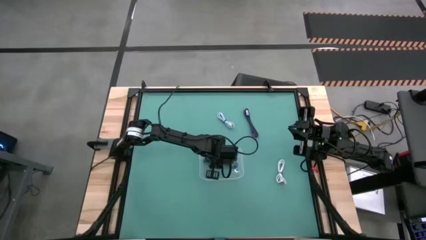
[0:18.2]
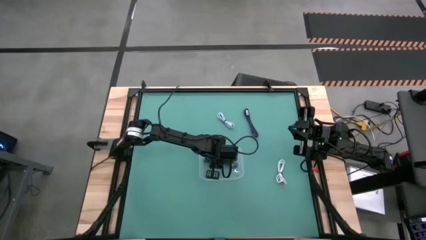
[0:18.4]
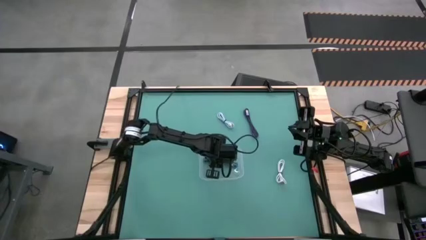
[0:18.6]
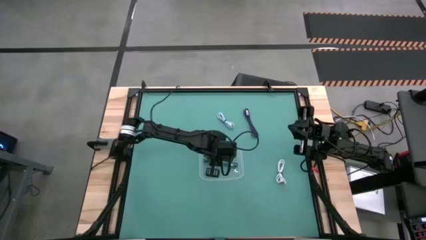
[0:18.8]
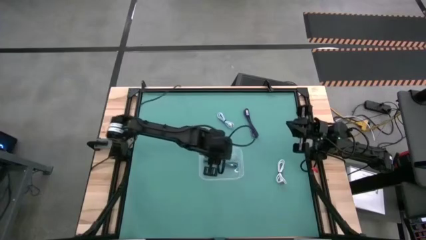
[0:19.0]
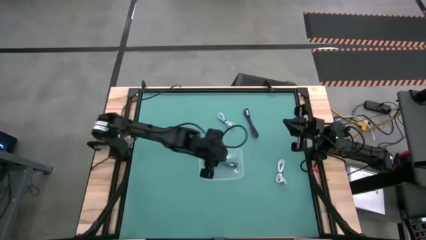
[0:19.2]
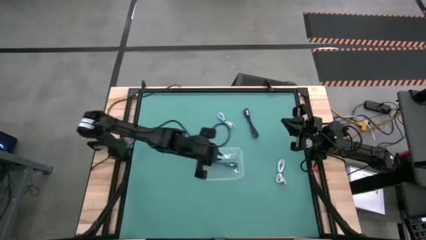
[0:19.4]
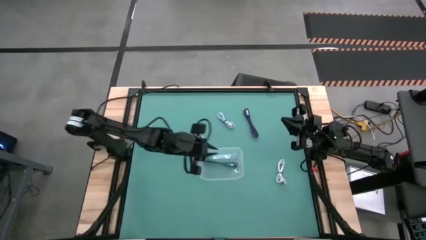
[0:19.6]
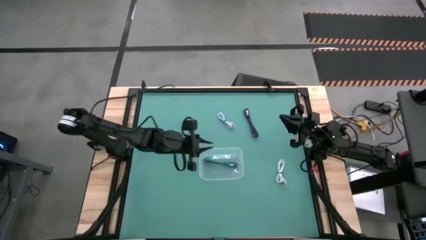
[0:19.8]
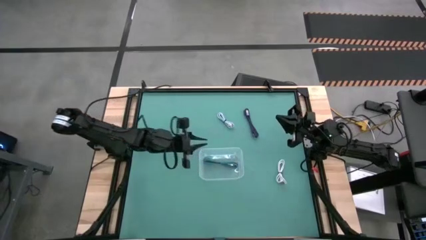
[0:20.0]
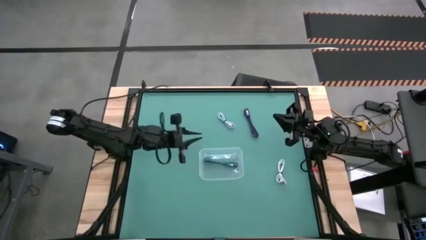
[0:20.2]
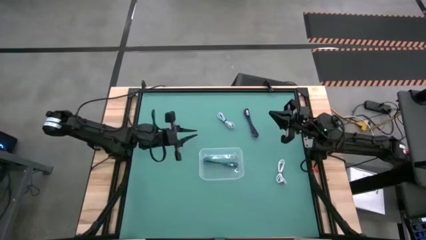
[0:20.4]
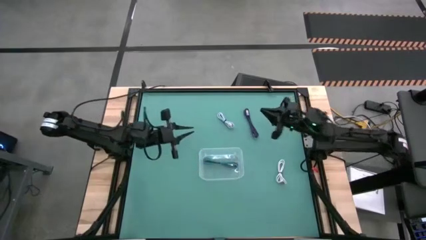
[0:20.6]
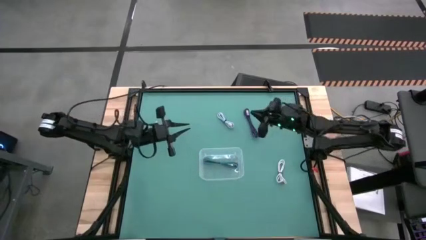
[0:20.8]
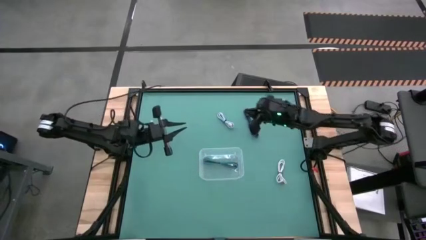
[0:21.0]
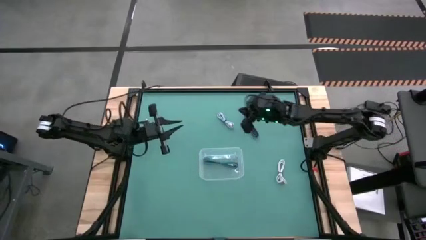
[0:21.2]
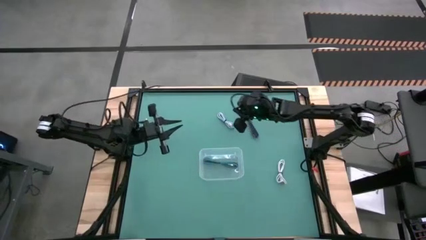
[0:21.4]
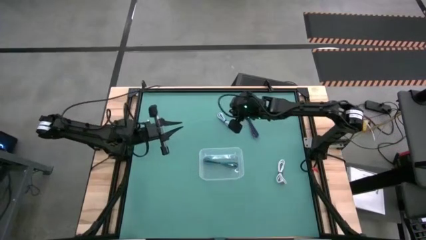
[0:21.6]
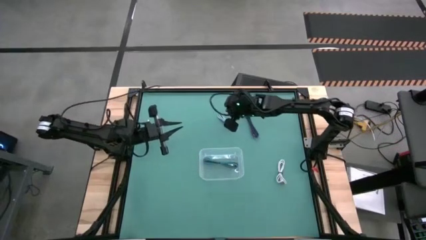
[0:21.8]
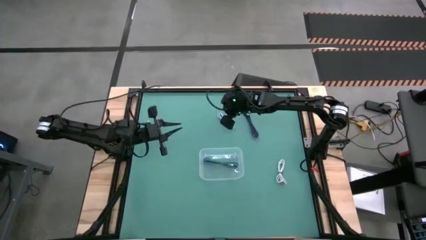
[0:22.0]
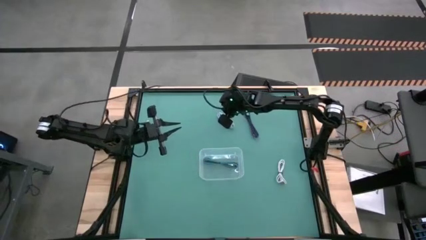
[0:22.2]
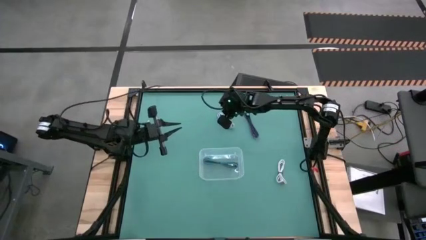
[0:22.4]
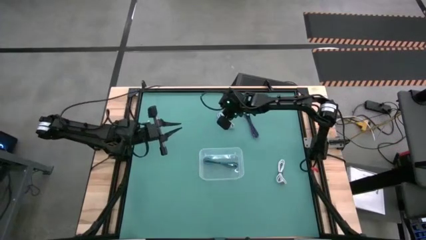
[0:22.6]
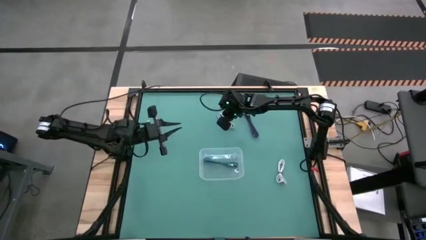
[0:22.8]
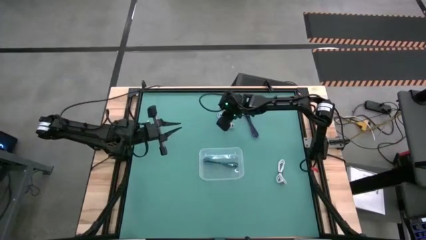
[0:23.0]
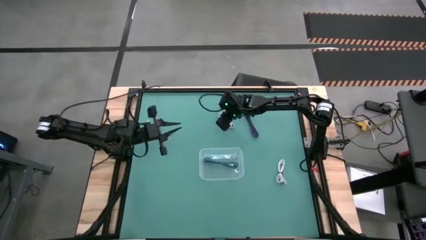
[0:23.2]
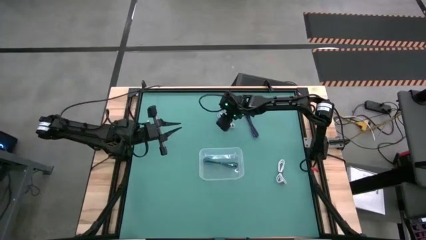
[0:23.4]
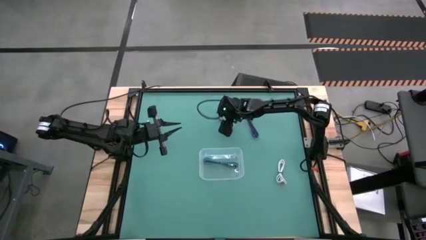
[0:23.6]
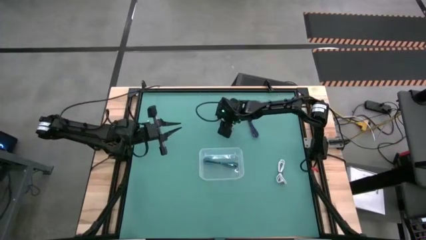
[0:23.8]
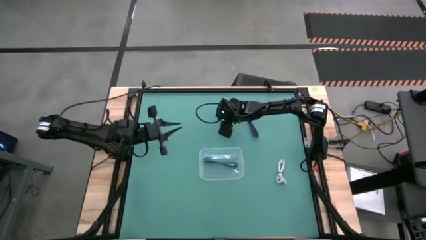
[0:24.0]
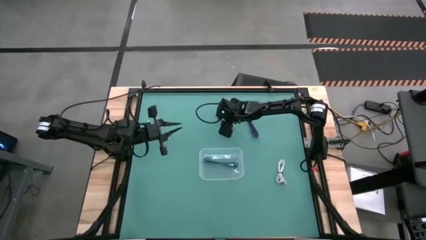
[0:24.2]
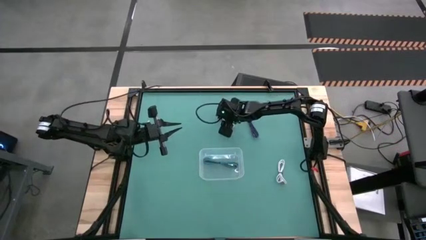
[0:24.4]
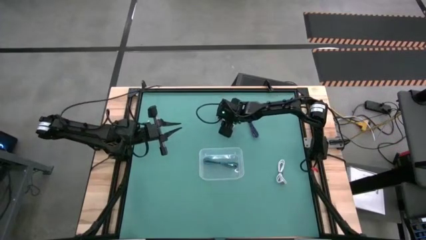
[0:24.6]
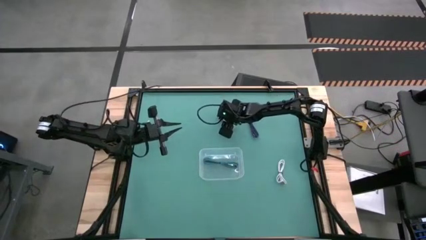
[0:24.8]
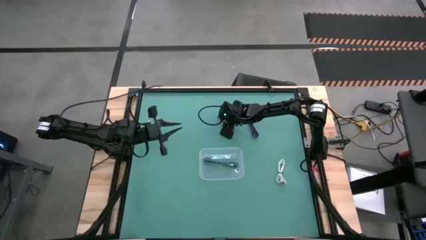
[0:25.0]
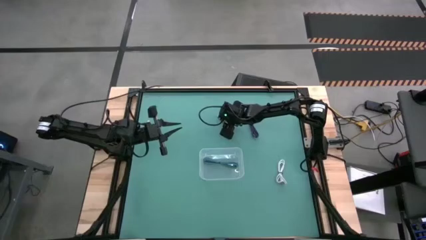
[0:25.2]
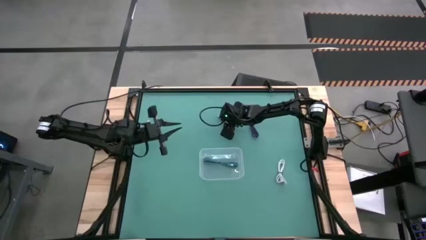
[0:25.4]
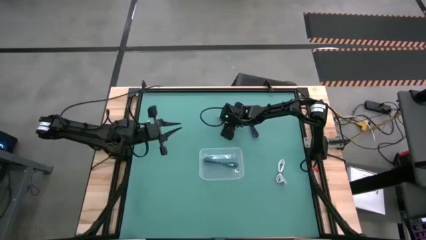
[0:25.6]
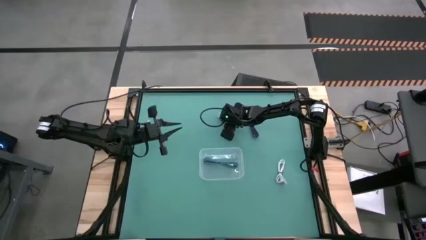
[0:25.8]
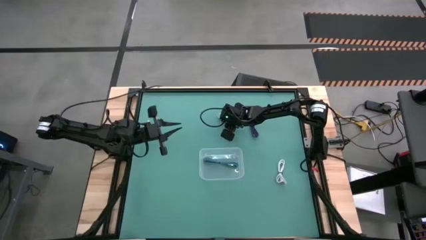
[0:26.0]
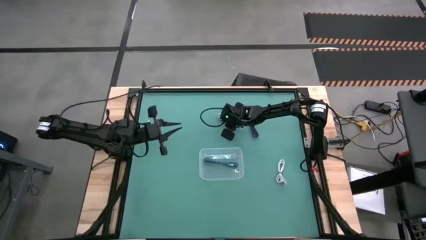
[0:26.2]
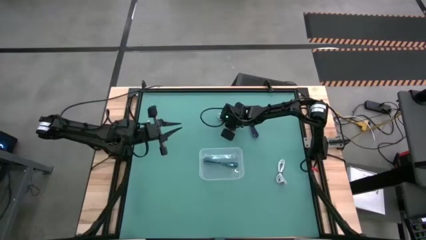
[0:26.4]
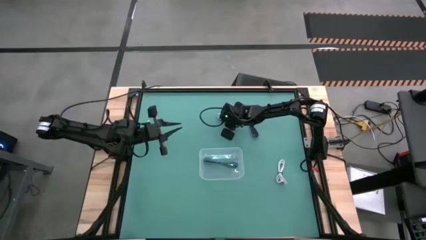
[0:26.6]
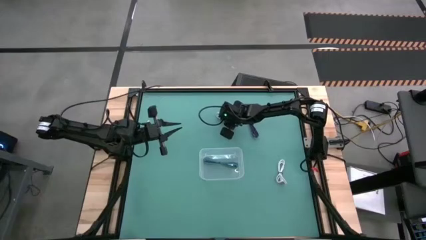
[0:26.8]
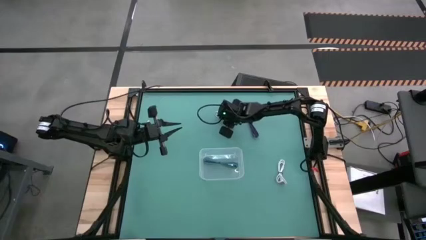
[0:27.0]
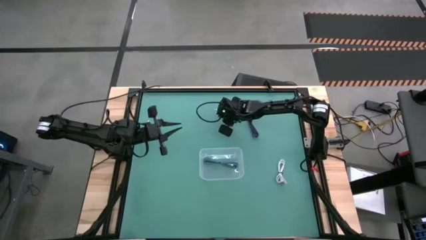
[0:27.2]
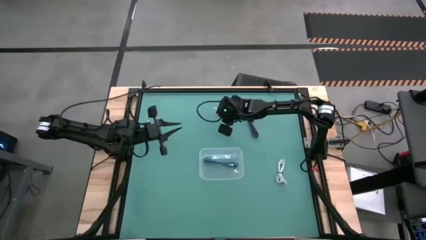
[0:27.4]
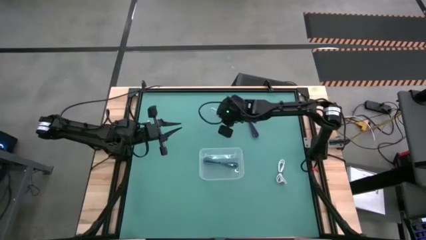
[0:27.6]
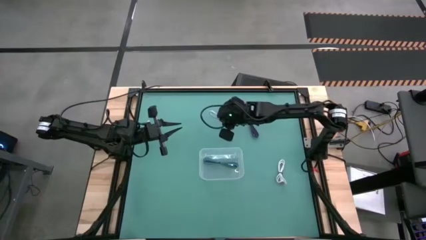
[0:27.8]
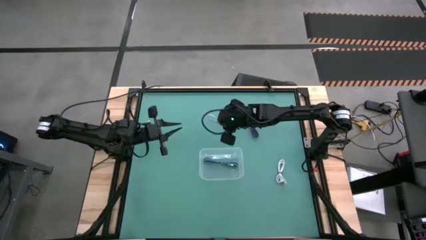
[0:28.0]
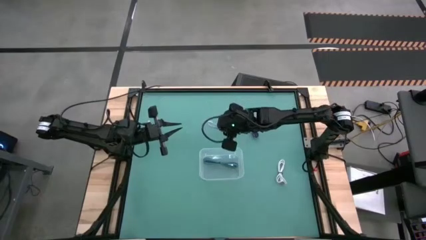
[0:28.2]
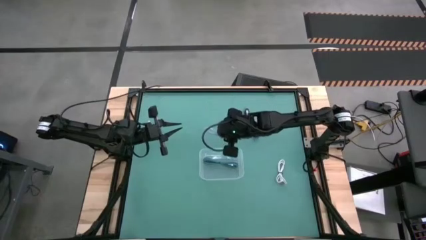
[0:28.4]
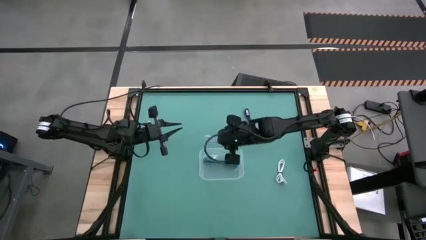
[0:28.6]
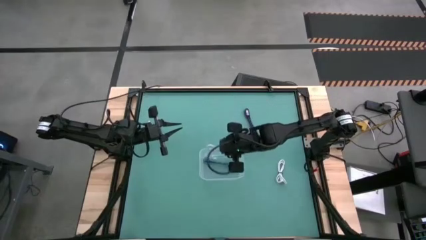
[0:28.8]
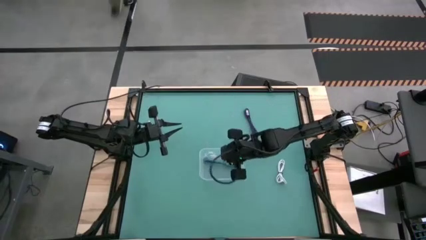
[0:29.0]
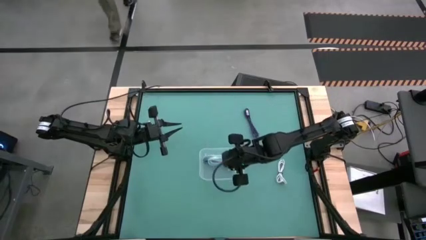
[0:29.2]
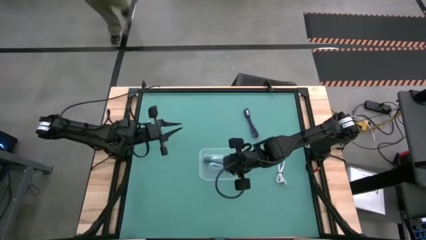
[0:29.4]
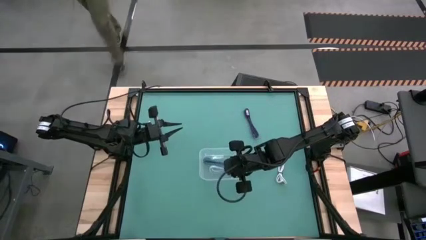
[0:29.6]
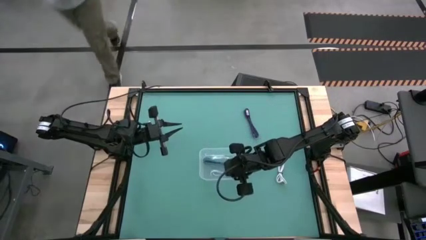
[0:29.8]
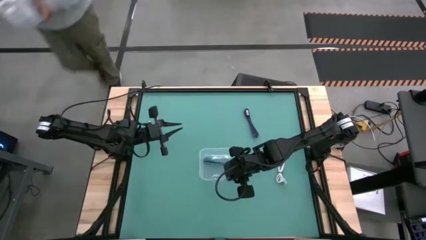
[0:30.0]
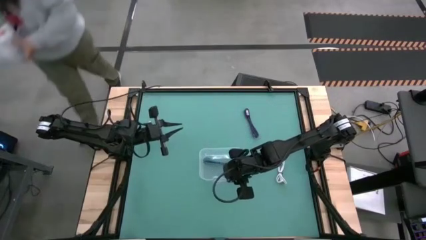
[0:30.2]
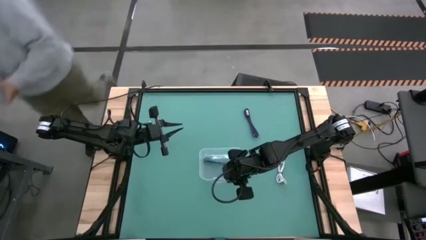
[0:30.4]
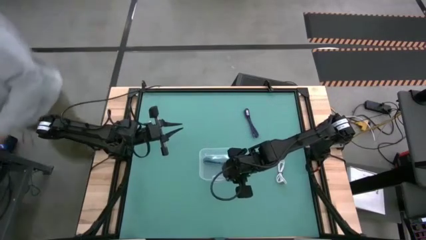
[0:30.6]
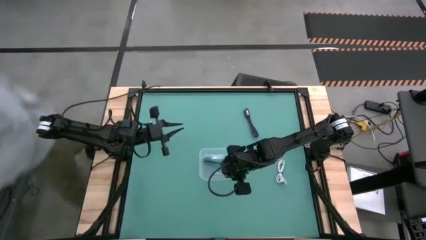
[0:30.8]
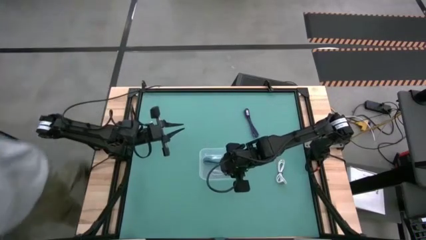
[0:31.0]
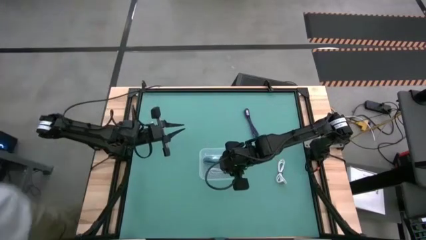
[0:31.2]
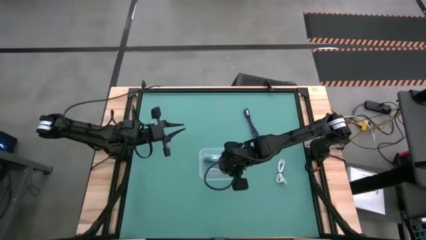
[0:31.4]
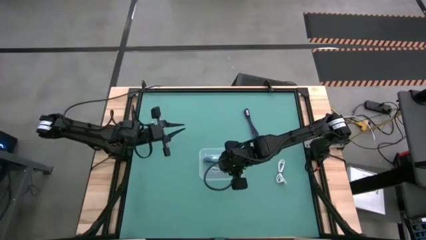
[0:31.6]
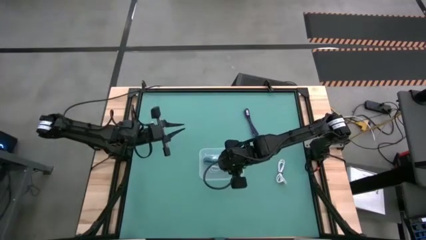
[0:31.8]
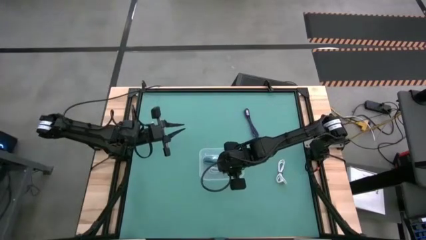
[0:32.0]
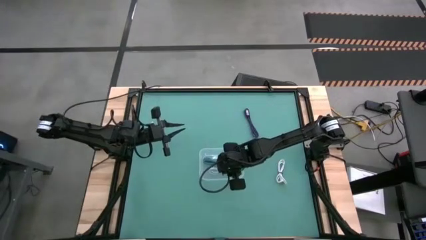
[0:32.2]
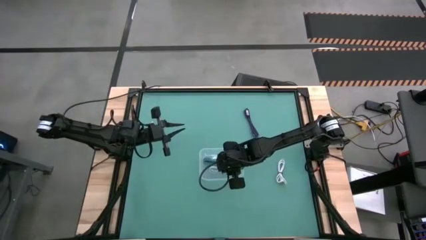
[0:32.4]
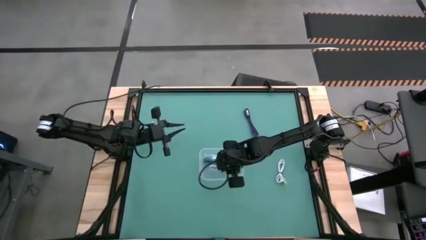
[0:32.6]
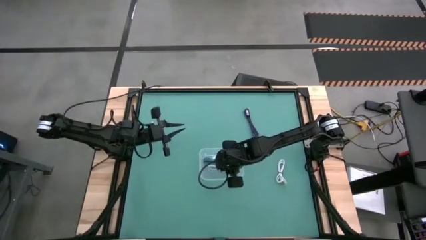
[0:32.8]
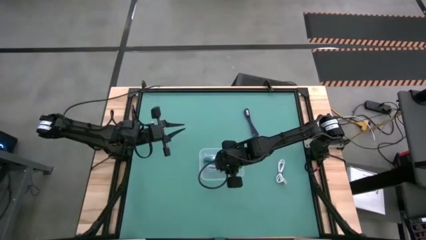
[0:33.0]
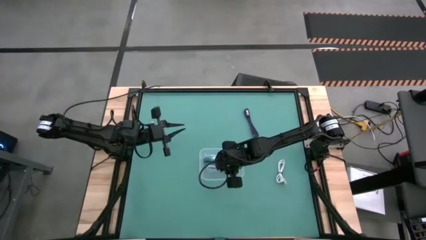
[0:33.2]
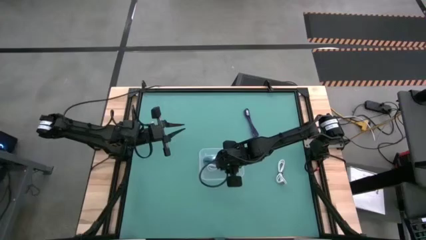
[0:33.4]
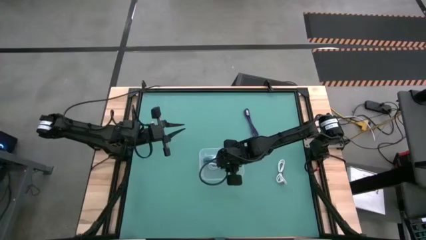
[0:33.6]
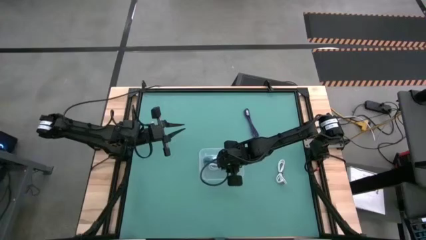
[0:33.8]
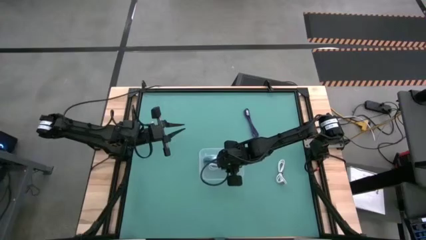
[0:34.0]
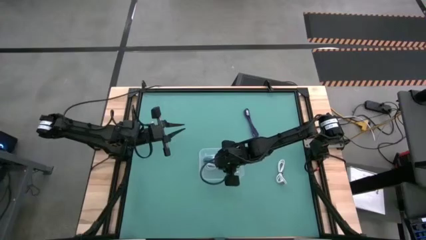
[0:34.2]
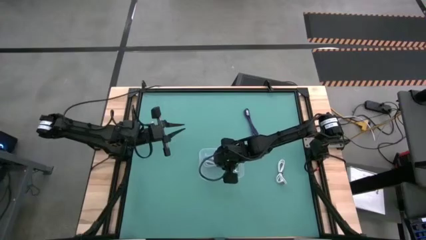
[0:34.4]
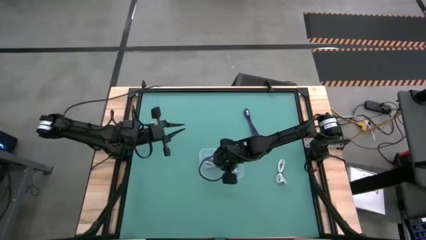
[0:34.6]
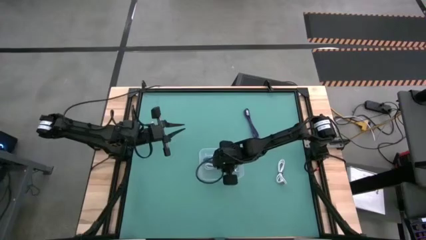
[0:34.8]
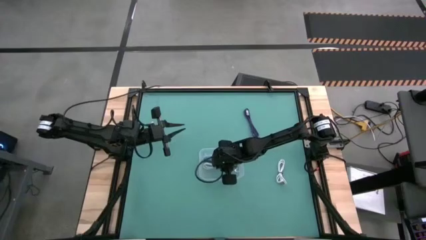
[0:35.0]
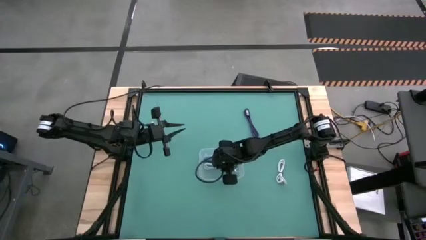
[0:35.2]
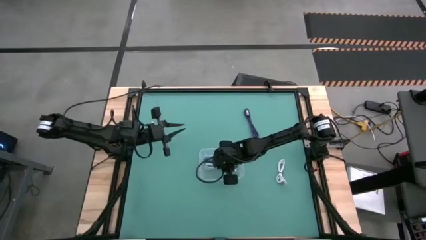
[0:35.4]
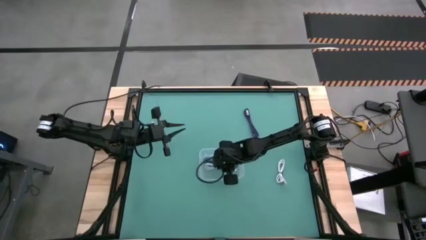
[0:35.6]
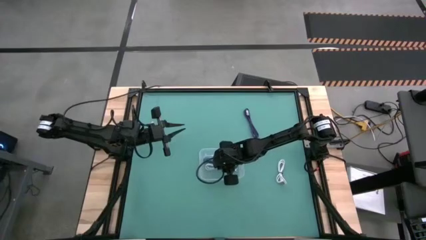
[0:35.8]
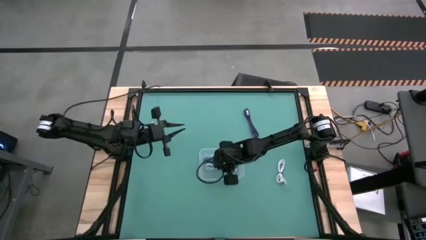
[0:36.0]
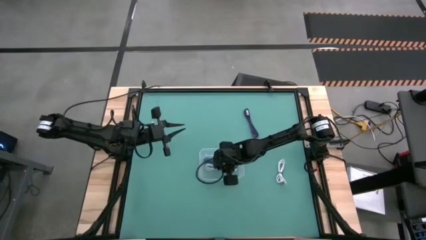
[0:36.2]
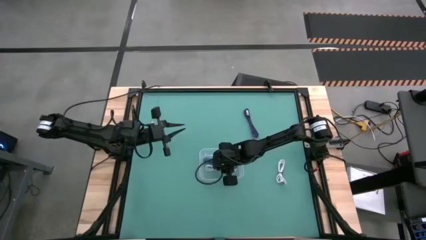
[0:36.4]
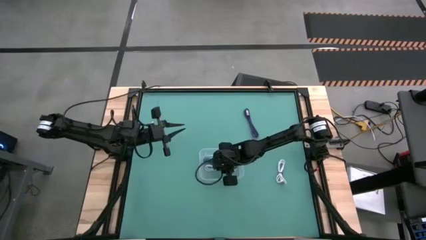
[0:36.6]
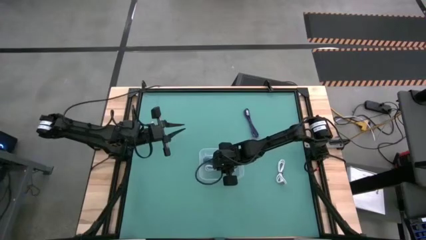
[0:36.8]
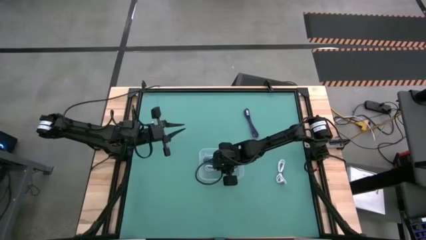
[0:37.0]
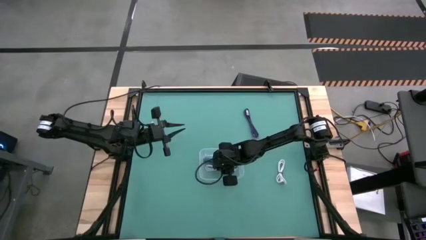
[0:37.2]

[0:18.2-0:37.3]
Task: Pick and place USB-C Cables
Put the top white charger cable into the transparent bin
